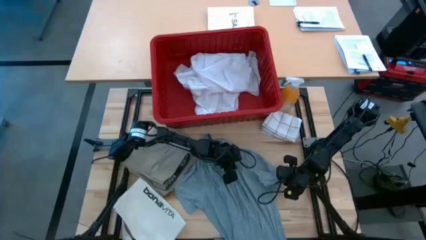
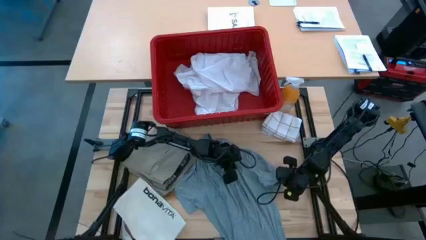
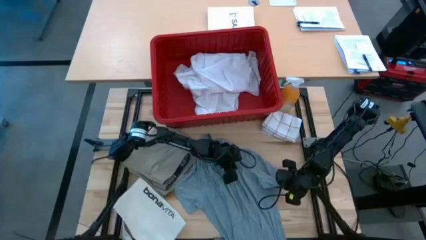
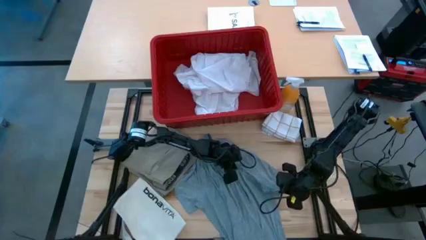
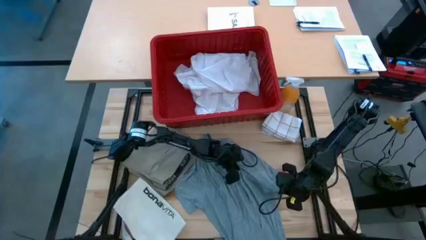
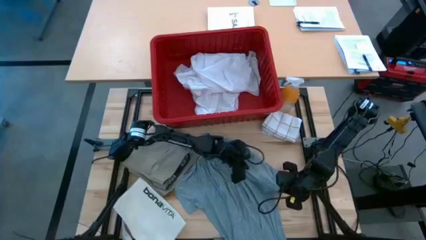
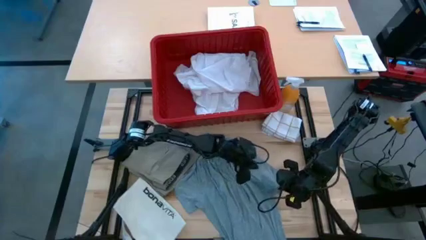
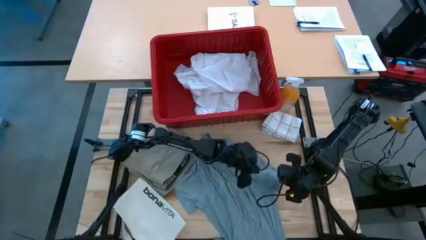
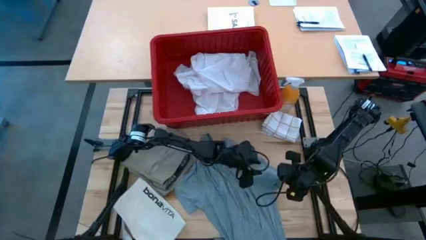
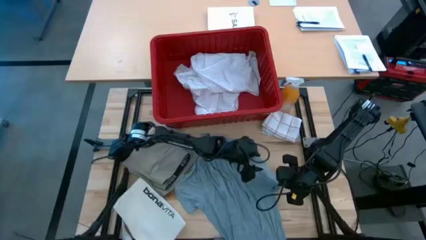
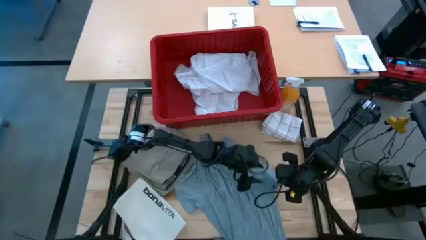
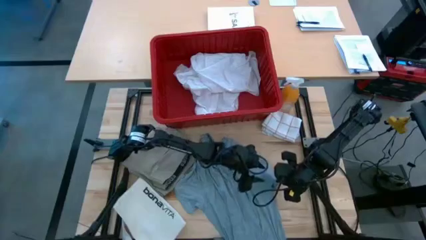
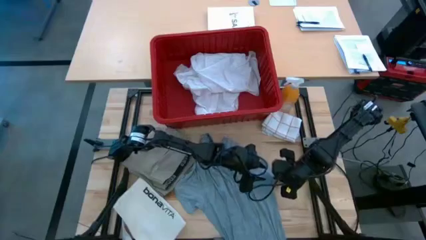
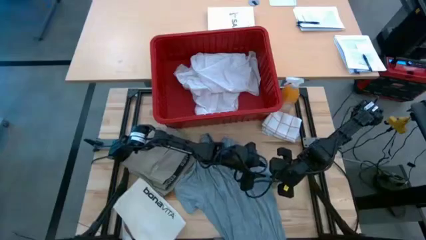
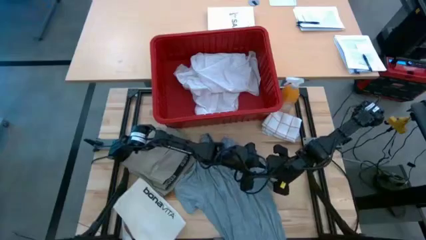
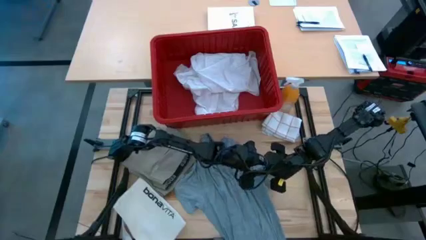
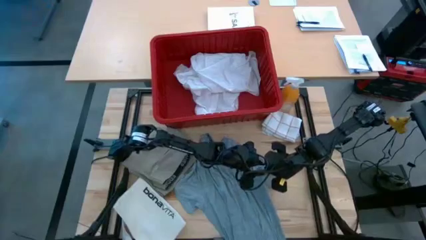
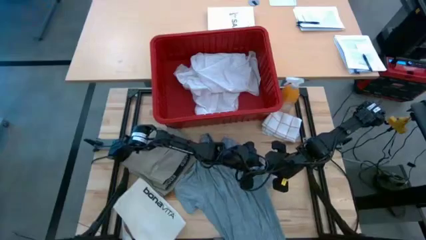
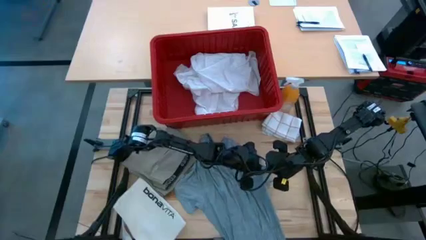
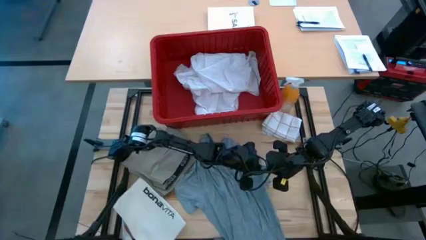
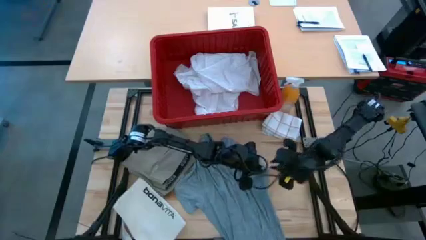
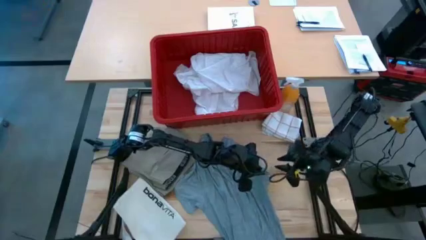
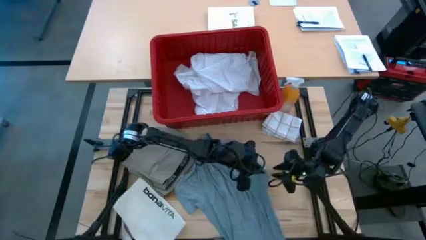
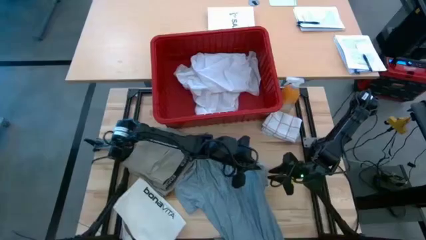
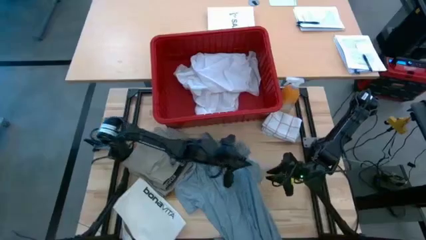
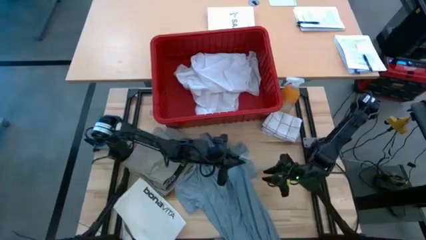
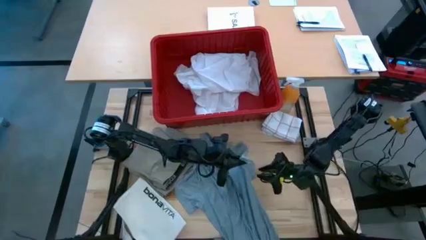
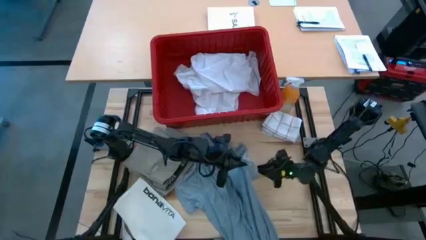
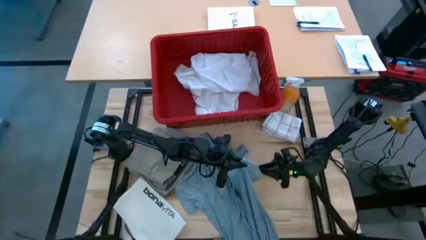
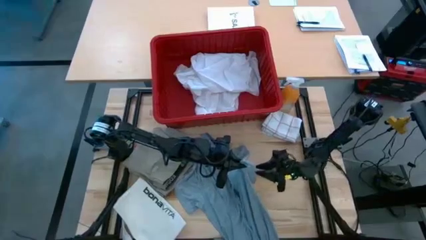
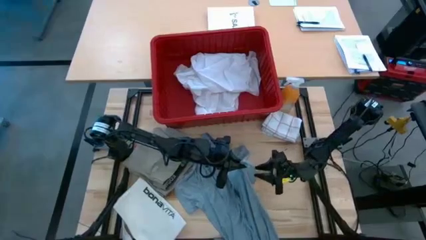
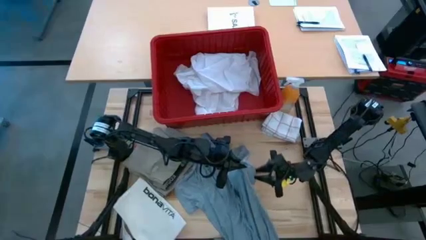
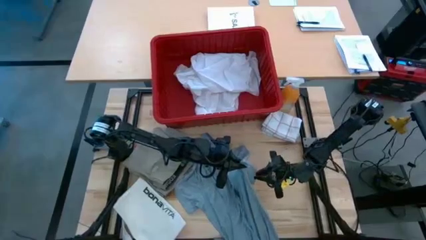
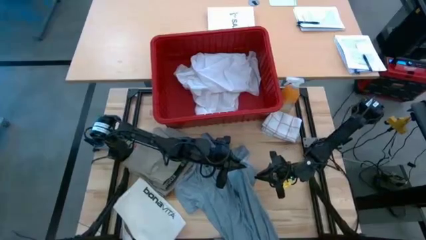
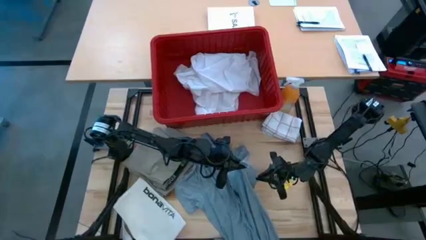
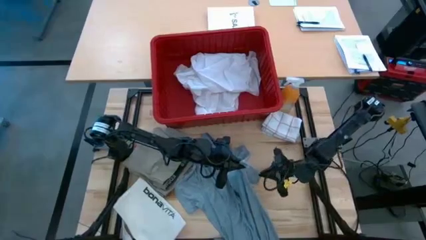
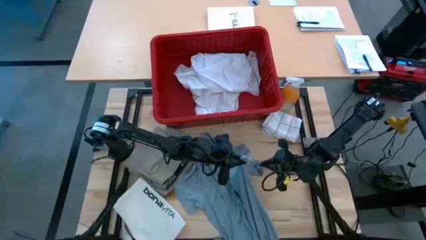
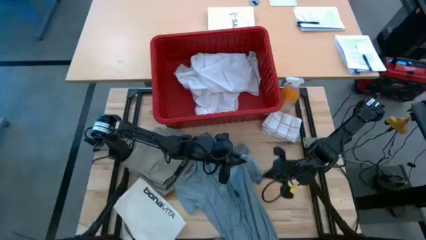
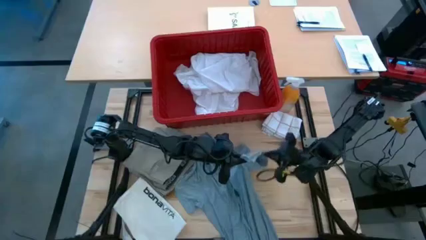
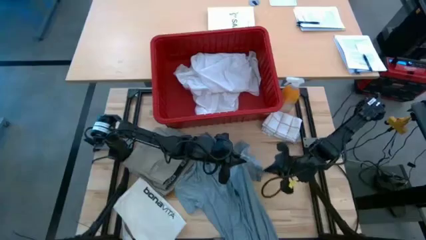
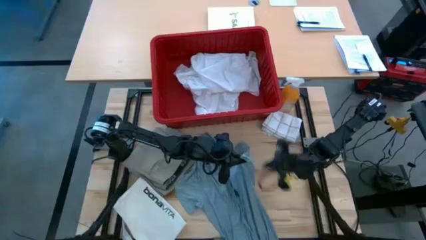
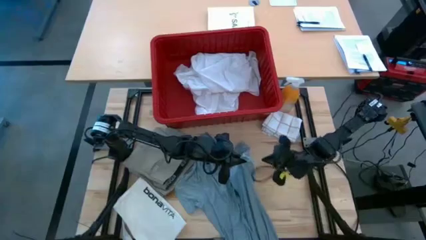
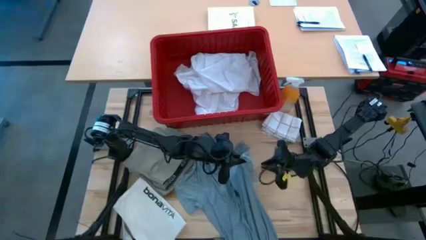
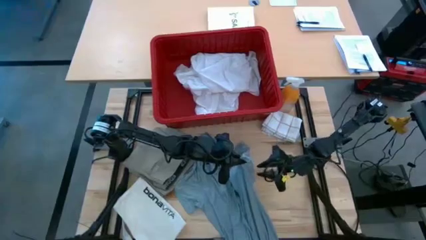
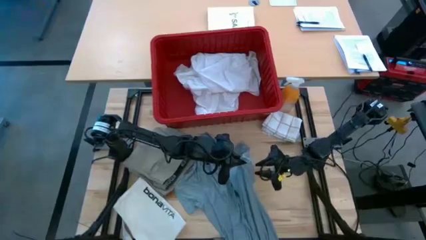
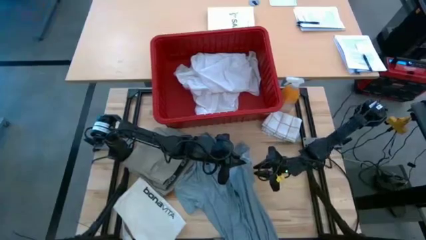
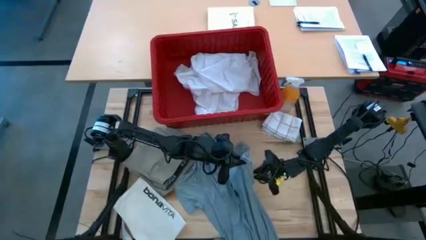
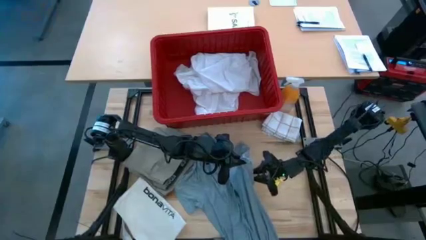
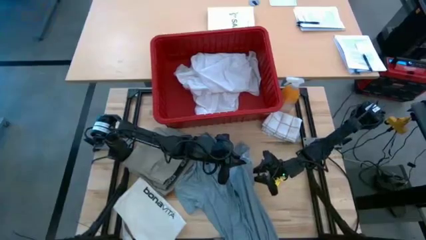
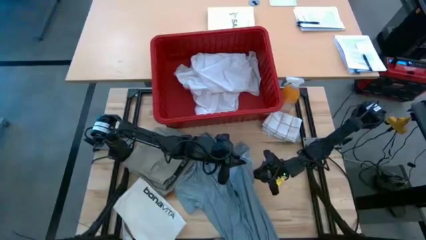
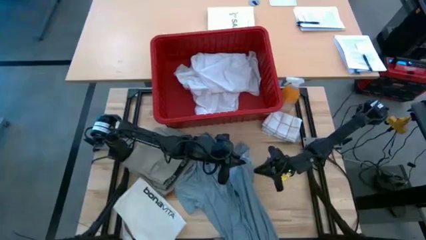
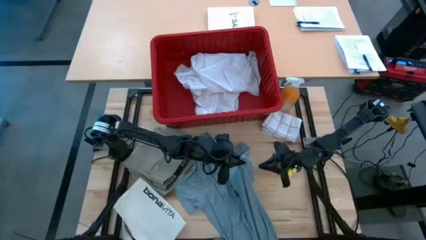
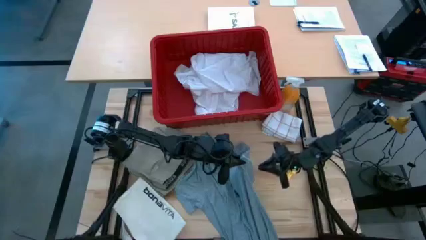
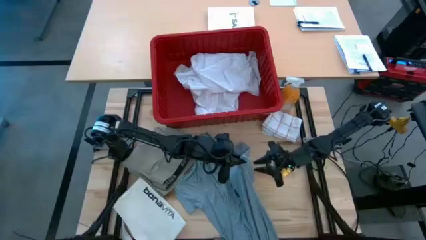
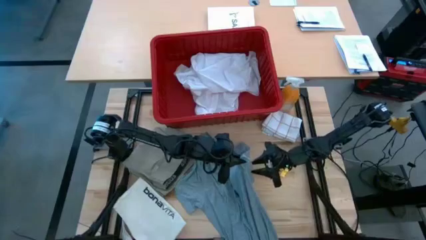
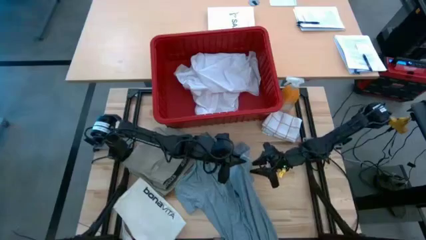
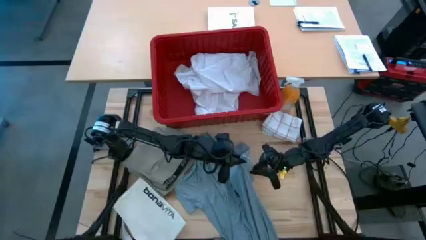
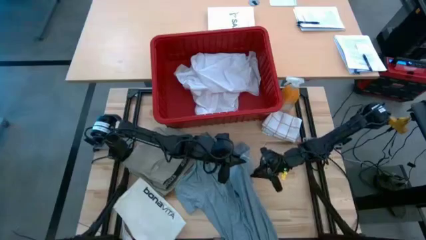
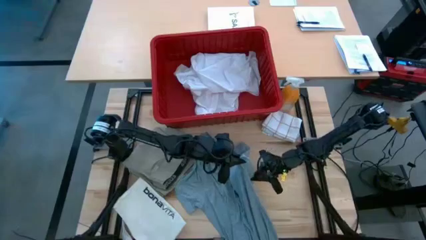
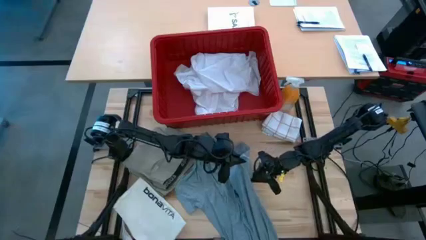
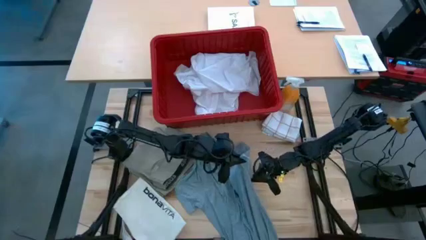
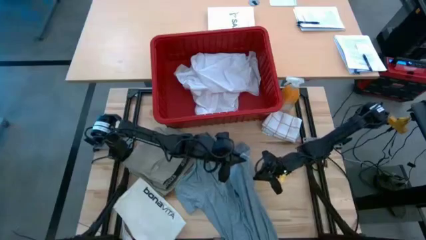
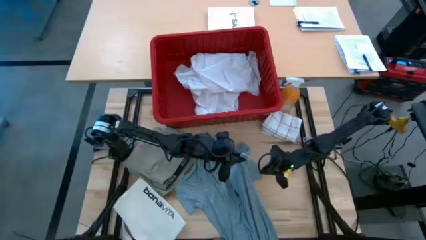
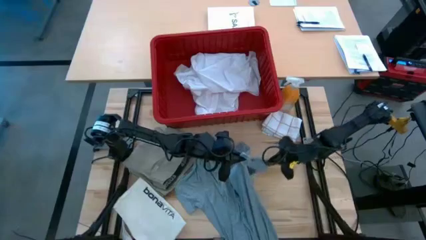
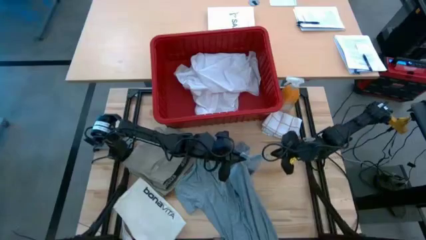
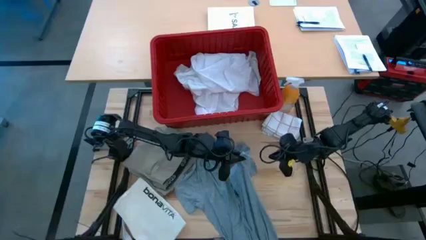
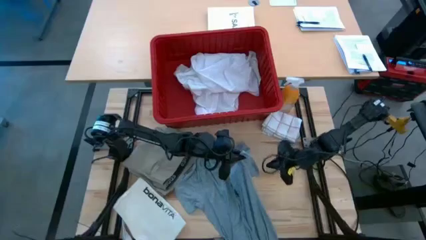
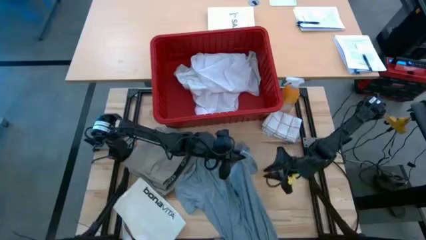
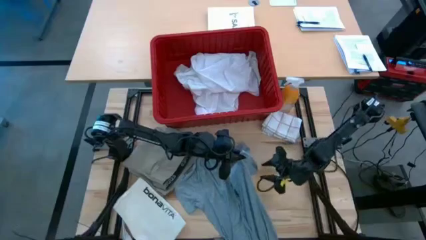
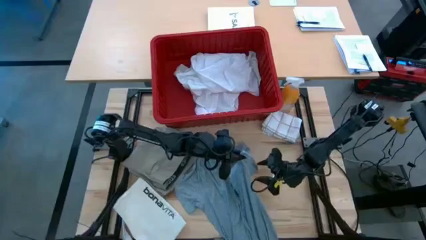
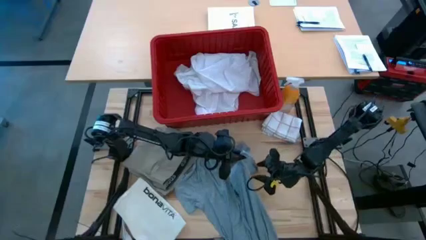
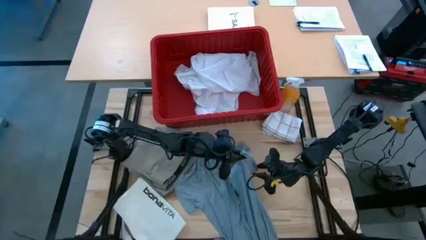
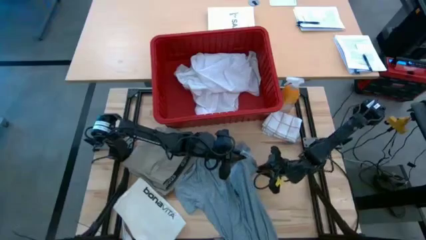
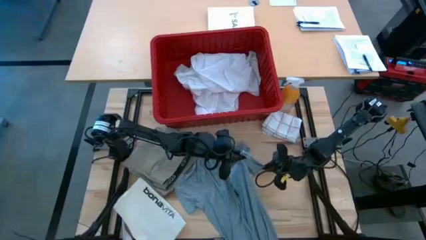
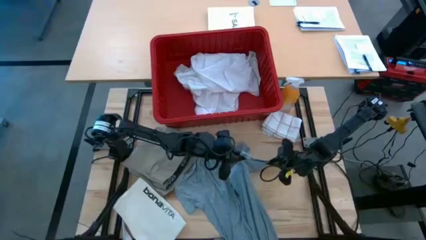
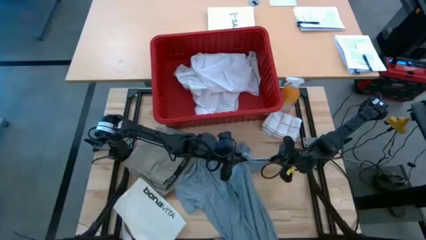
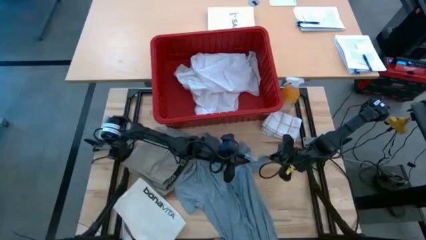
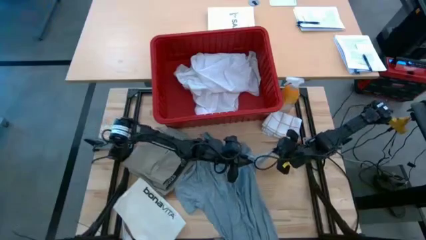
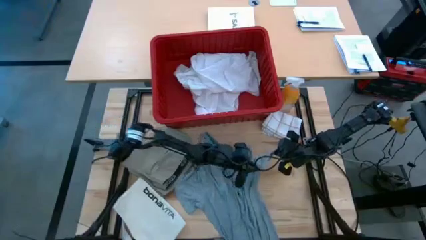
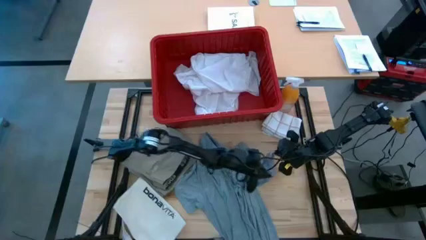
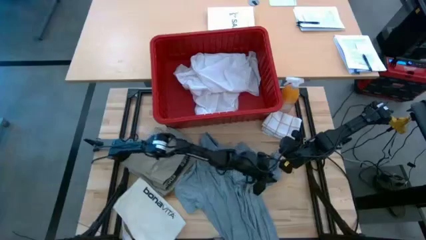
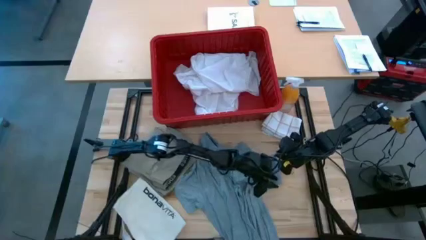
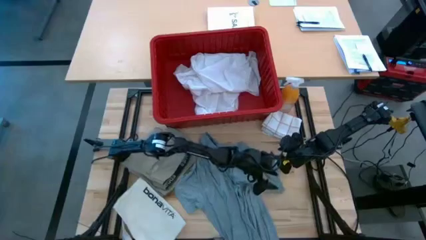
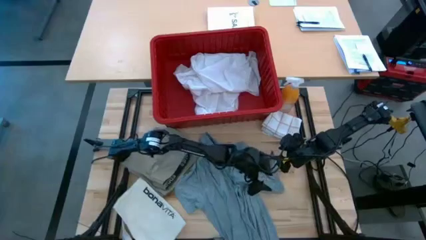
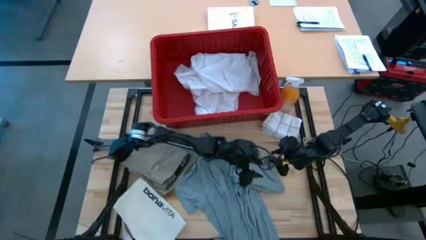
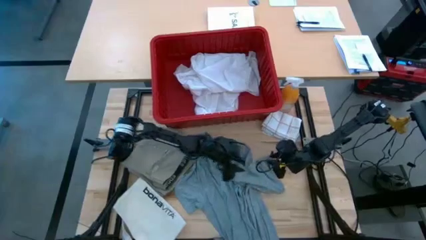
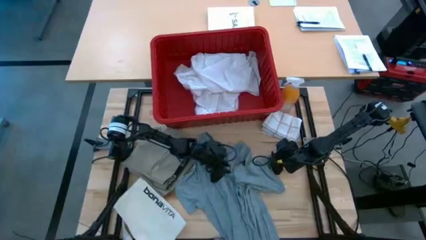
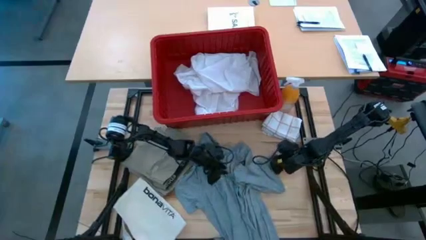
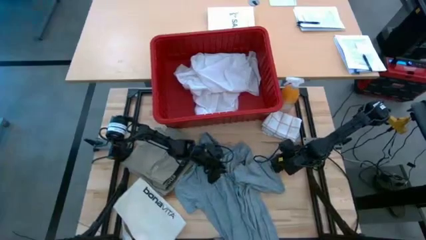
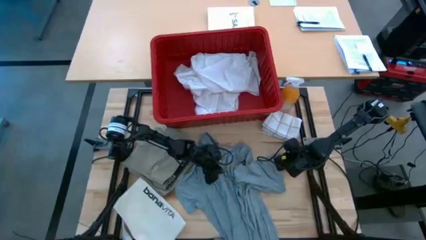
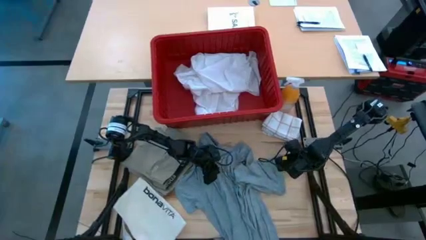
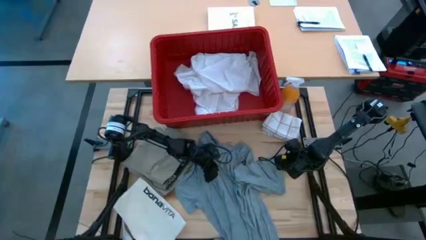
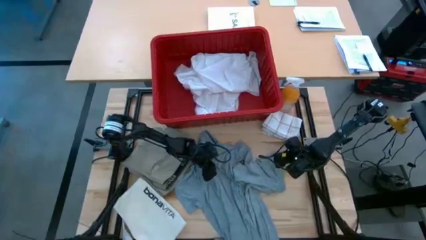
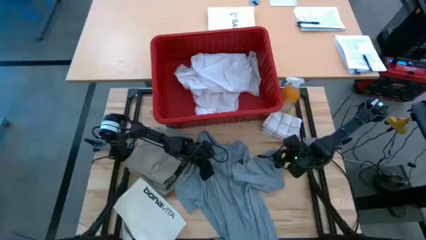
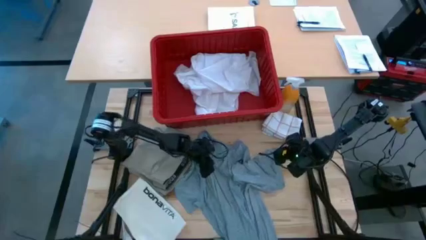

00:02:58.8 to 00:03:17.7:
Task: Fold laundry
Fold the gray shirt
